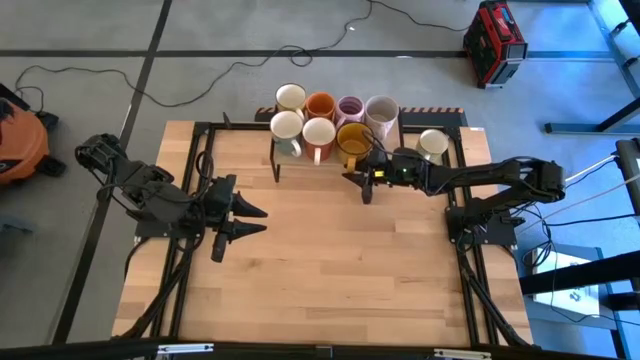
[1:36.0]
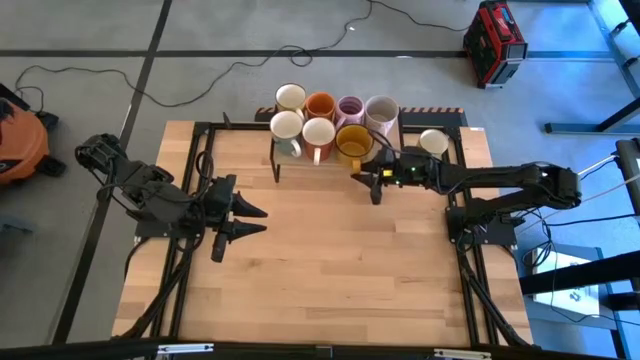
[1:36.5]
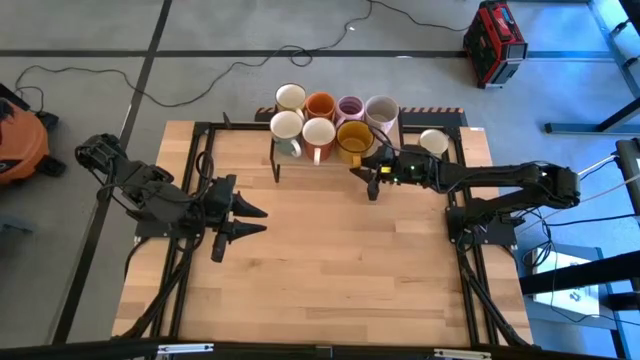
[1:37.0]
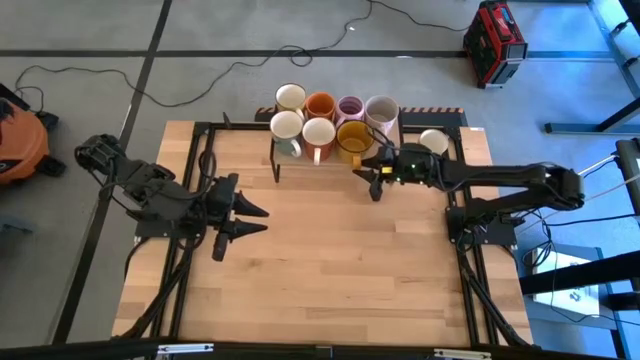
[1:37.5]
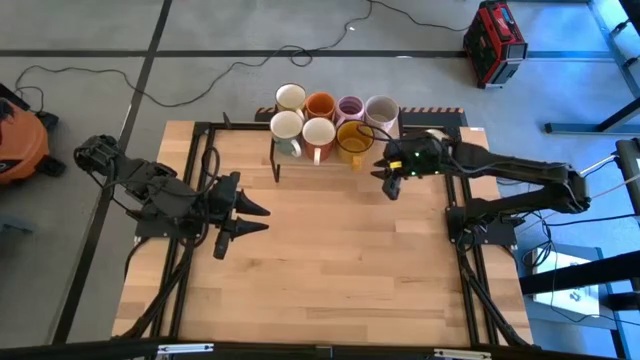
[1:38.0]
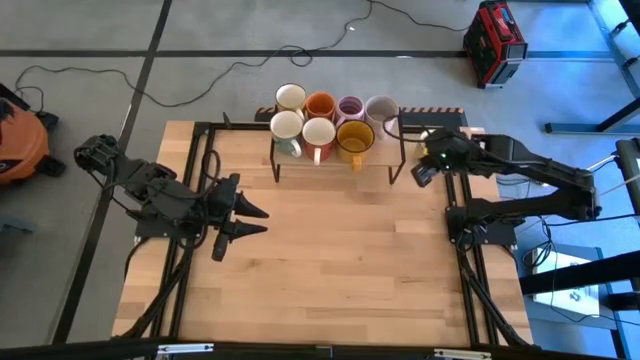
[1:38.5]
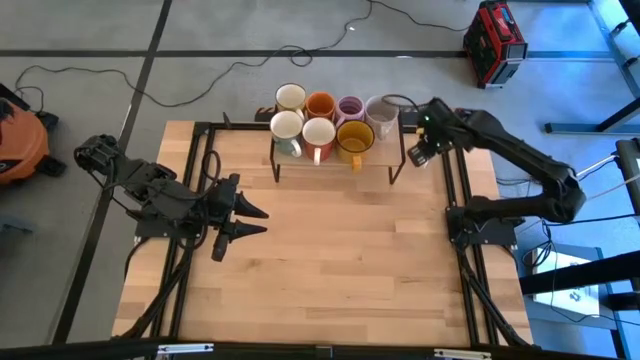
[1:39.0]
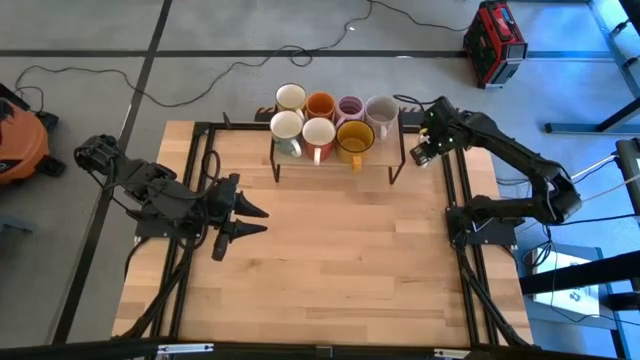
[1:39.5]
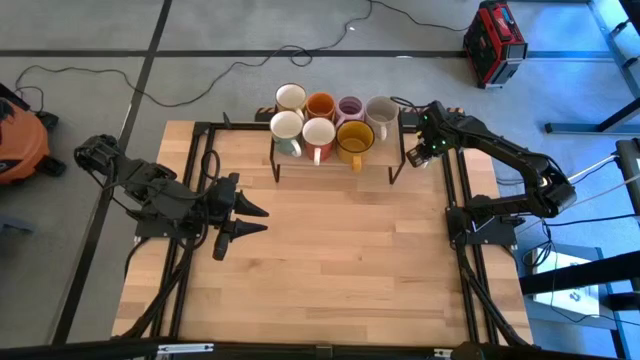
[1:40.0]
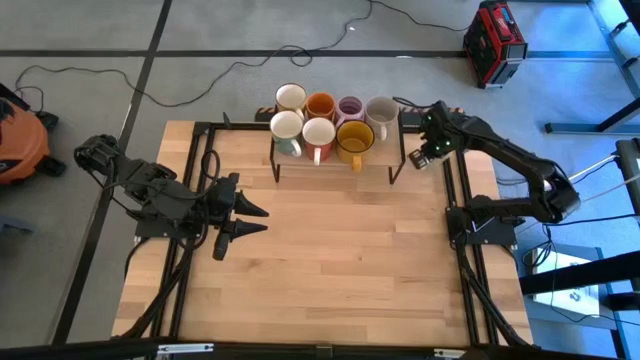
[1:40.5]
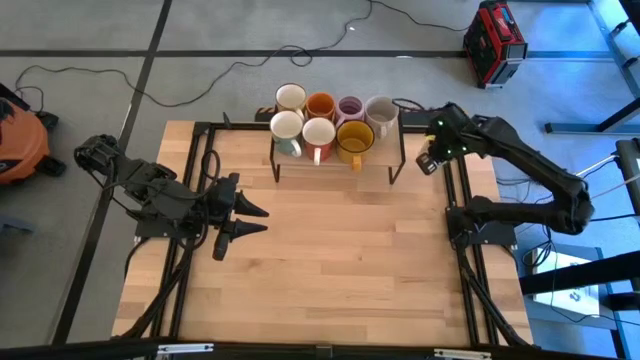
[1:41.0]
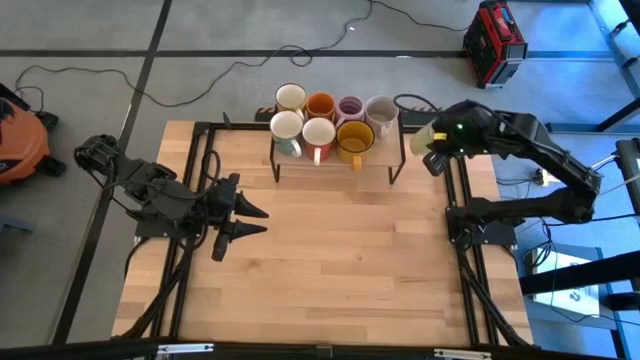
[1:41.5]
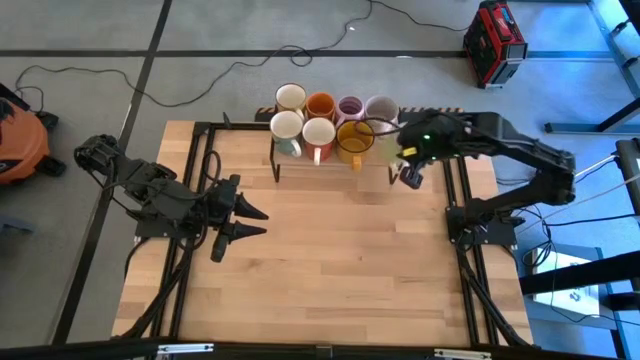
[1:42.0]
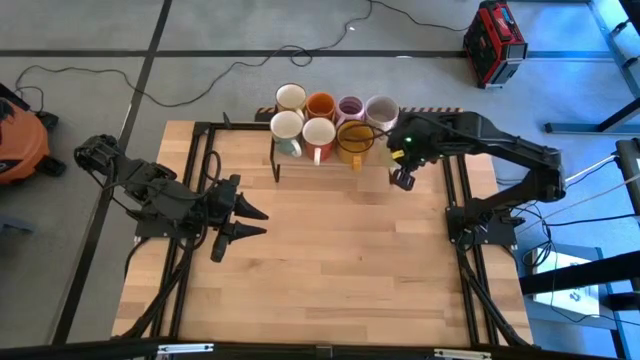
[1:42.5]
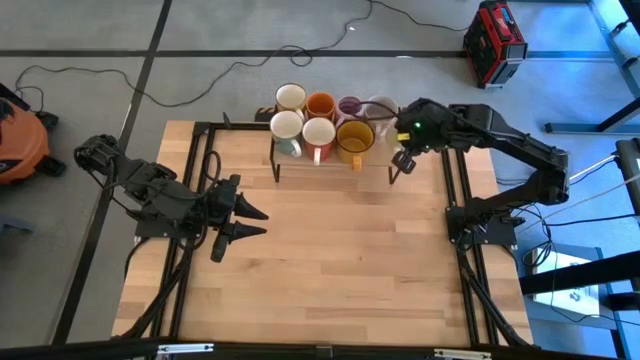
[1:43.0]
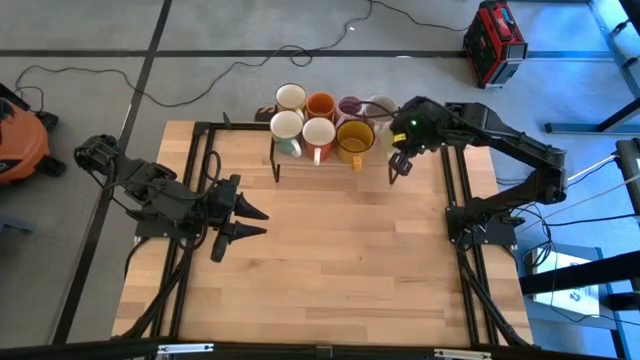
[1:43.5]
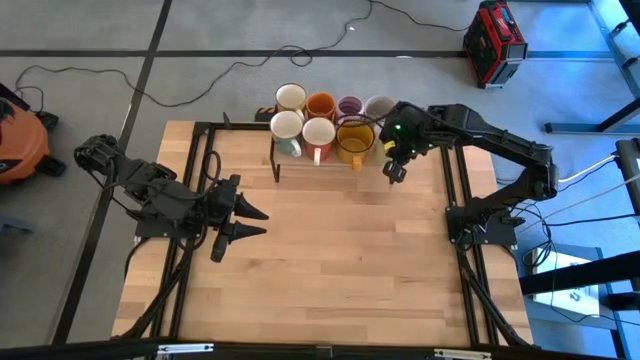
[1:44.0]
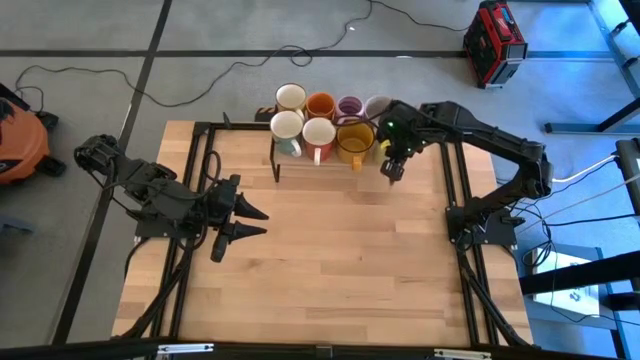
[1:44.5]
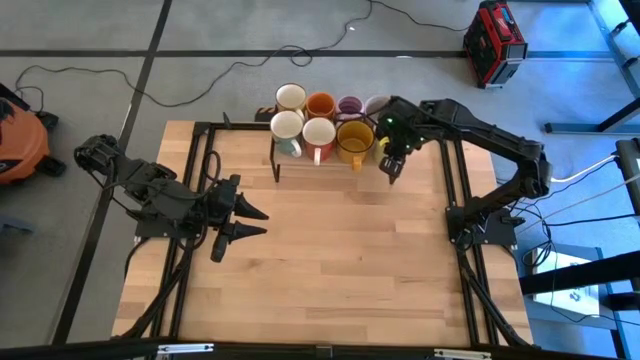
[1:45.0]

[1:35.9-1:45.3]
Task: Place coffee mugs
Put the light green mug on the shelf

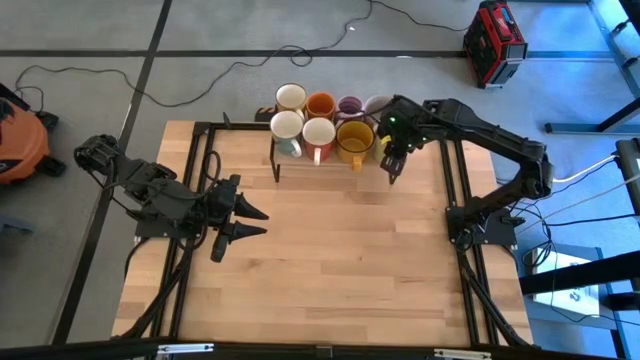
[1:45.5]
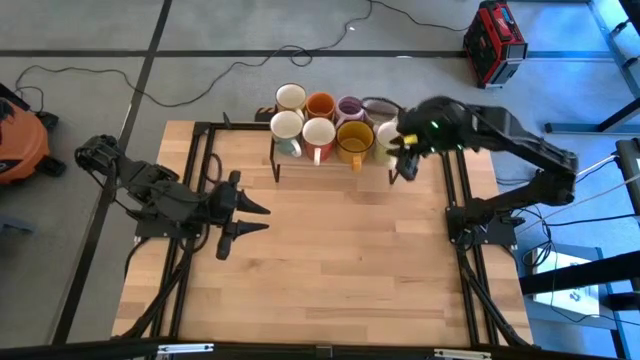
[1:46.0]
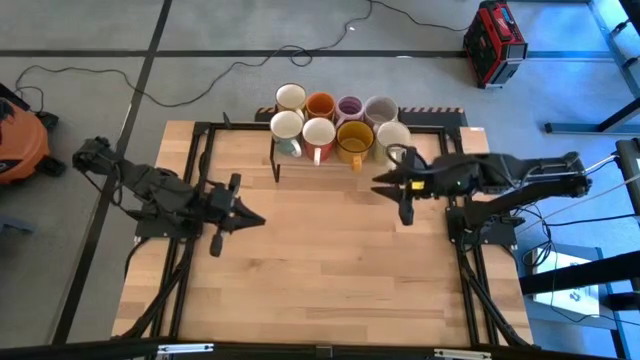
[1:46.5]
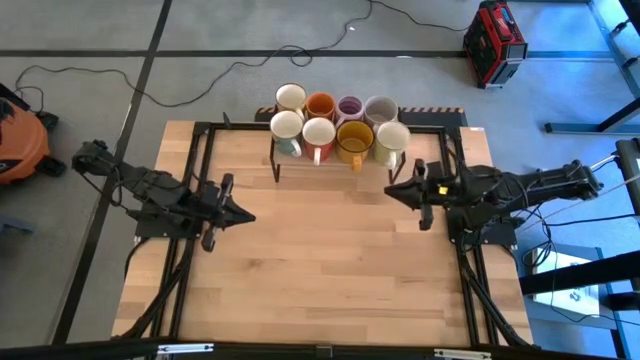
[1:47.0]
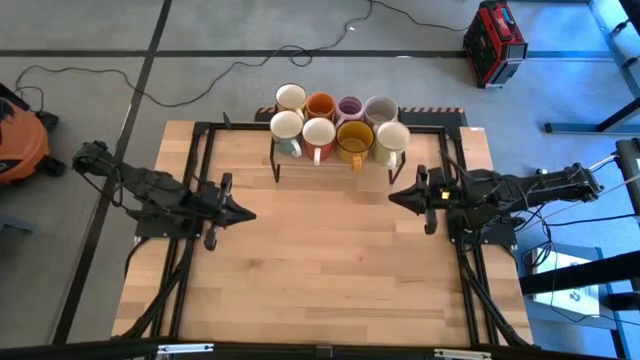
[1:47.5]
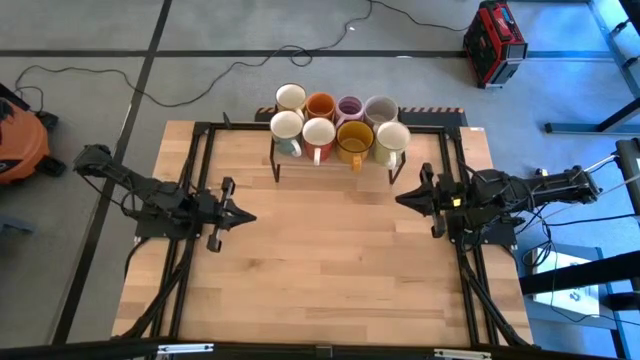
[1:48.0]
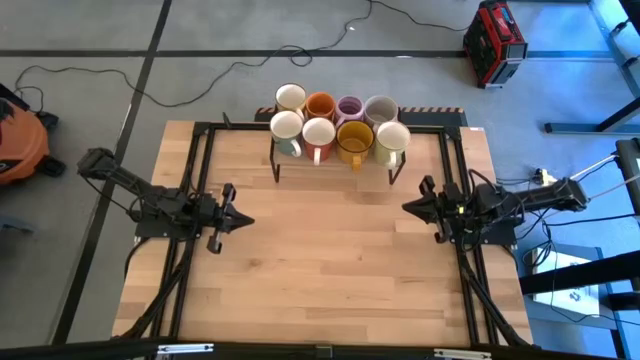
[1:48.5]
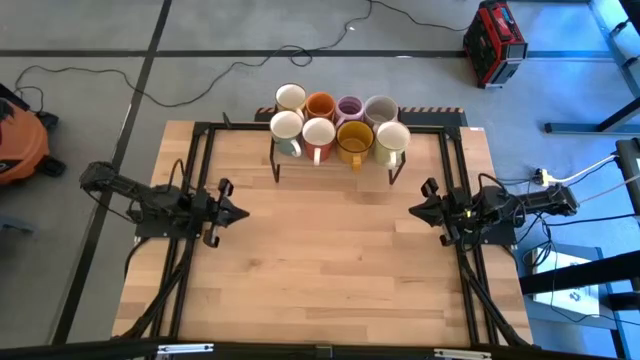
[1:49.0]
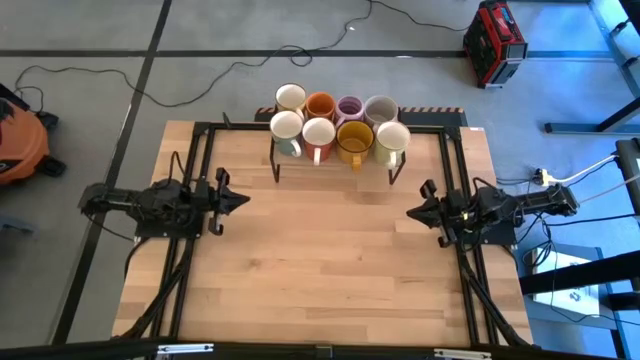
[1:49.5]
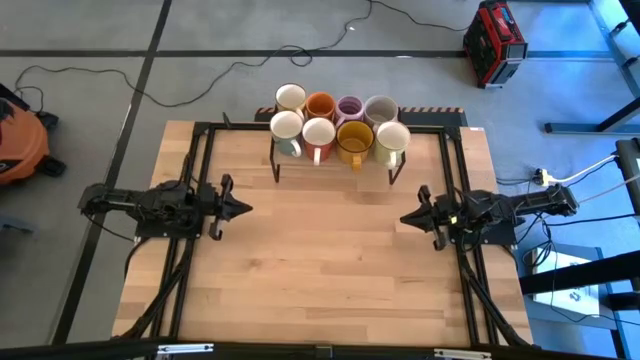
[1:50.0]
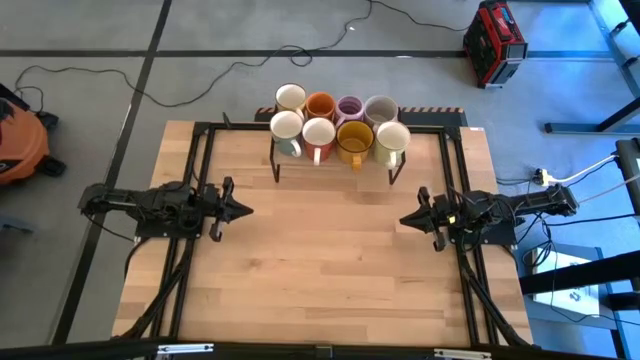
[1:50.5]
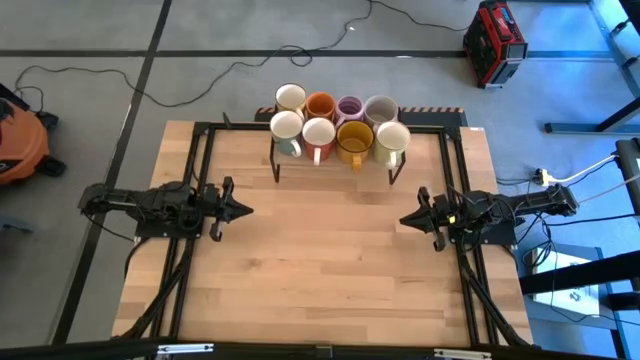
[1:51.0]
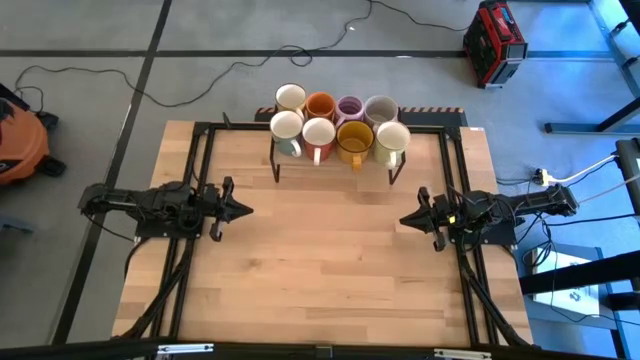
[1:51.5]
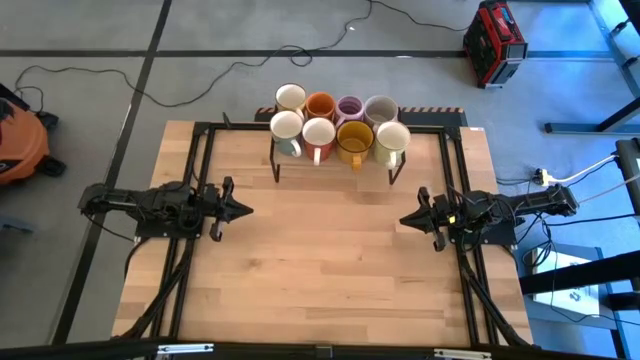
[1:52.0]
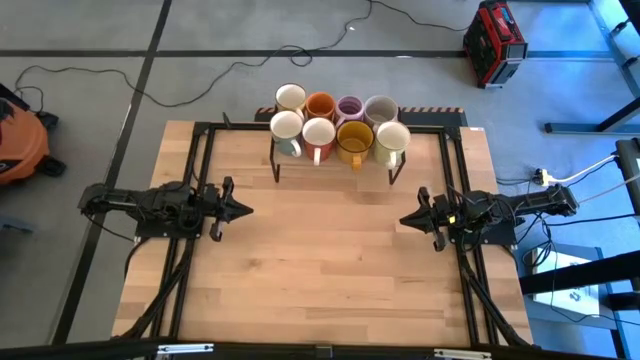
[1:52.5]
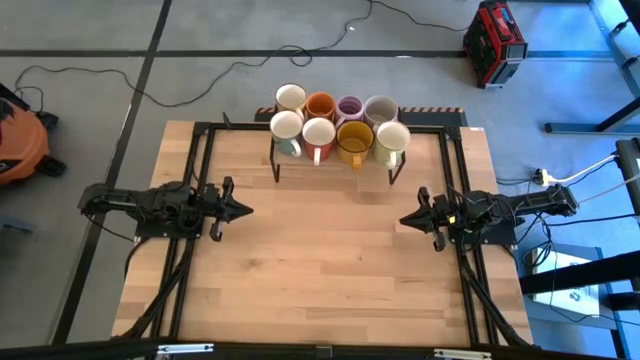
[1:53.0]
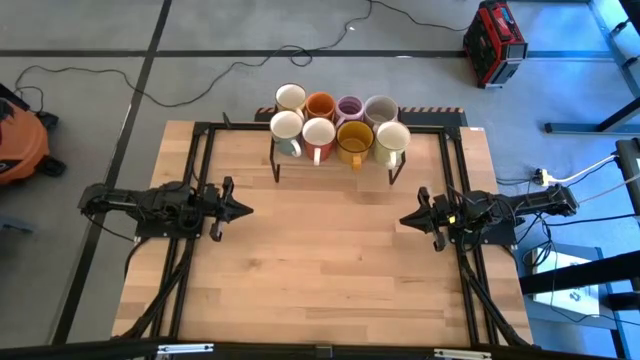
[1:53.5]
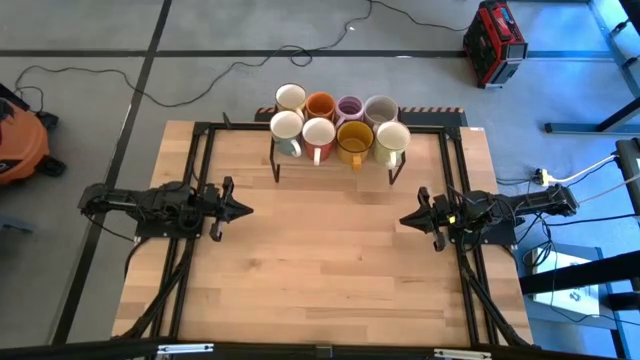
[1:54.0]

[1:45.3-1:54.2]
Return to Home Position
